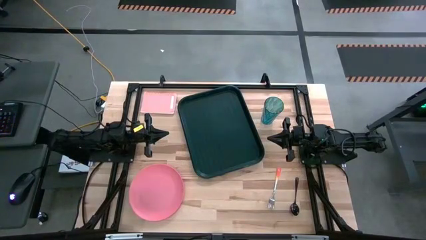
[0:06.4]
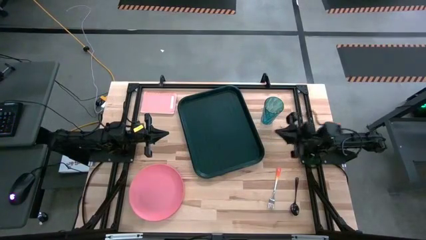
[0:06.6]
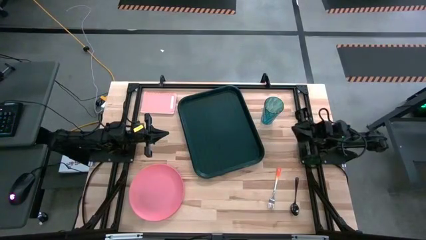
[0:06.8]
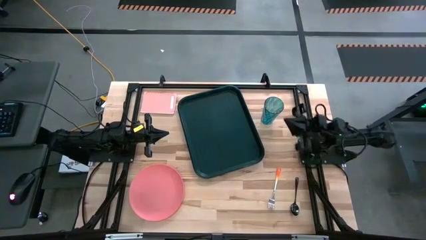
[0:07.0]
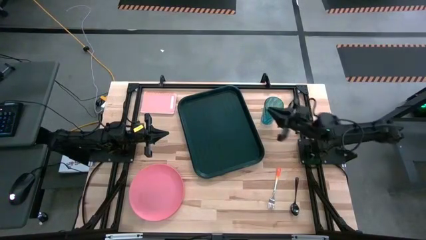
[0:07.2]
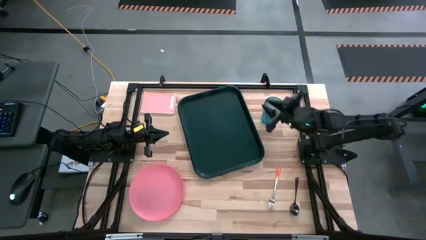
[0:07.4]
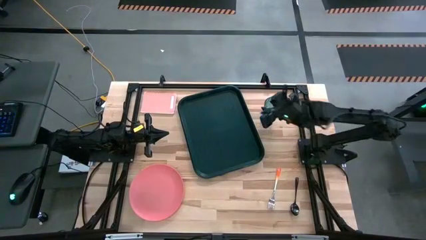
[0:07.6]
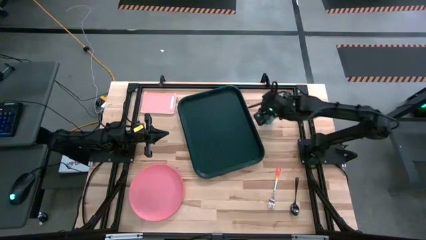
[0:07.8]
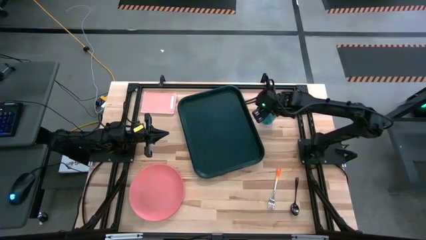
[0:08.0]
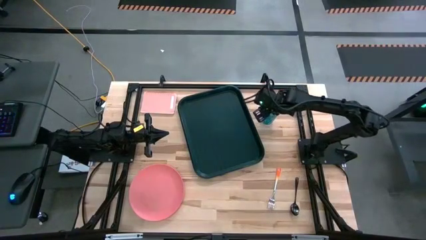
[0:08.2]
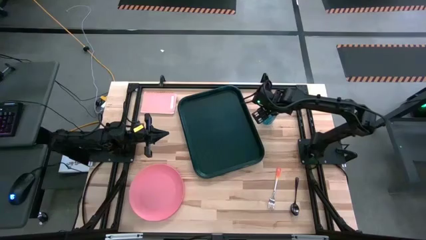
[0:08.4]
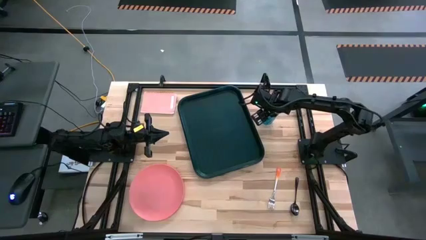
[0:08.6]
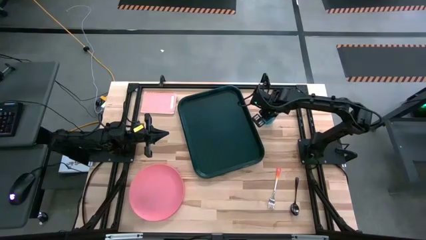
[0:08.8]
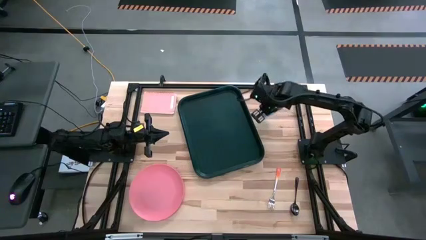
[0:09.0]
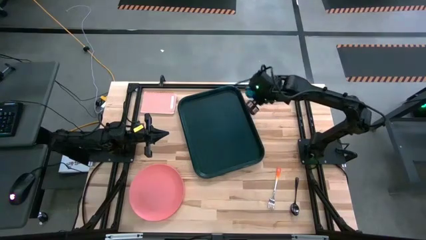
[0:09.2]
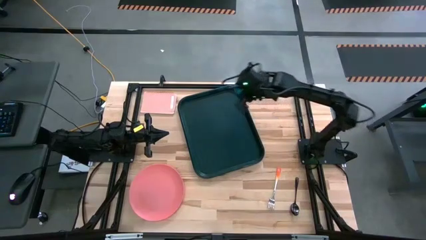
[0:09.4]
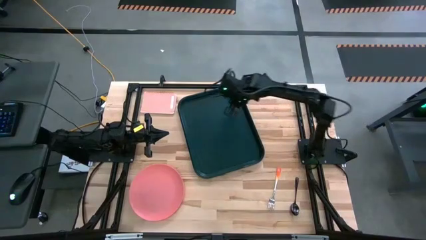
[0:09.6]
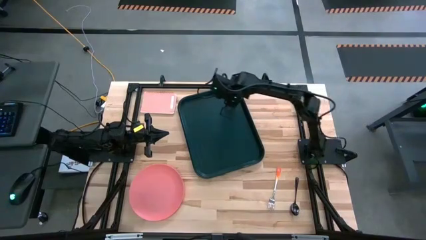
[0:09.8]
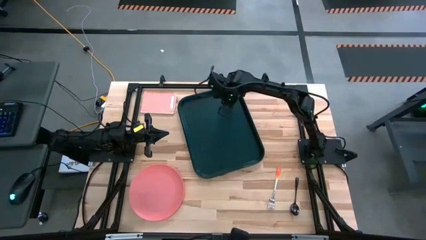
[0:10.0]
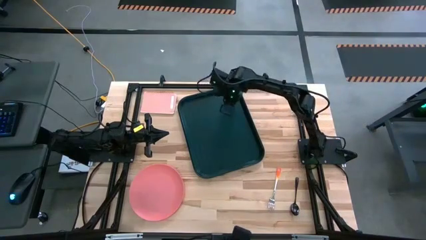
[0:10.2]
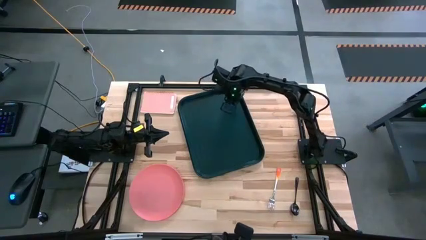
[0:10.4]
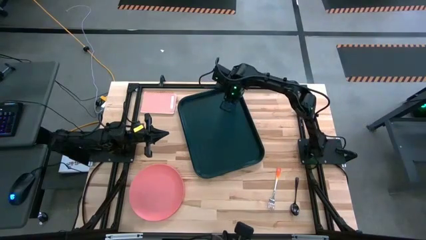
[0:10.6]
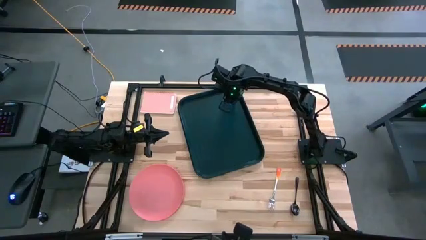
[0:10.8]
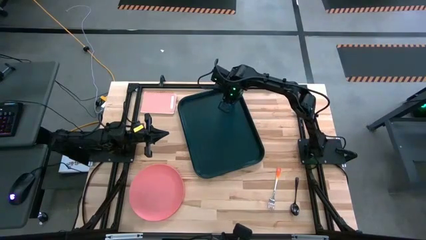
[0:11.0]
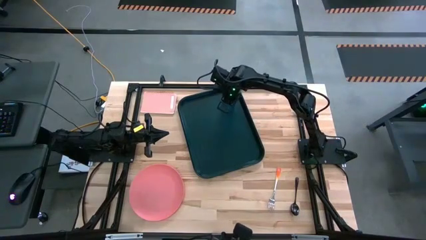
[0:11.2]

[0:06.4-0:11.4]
Task: Pick and place plate/cup/fork/spoon on tray
Put the blue cup on the black tray

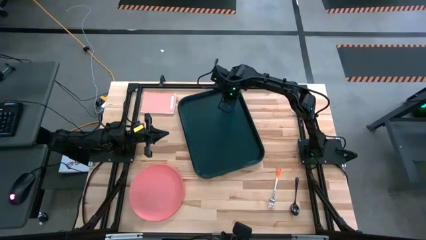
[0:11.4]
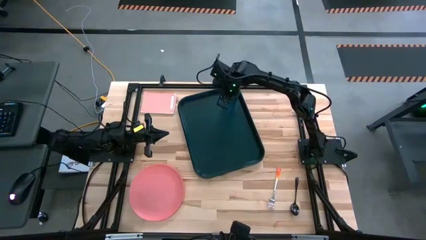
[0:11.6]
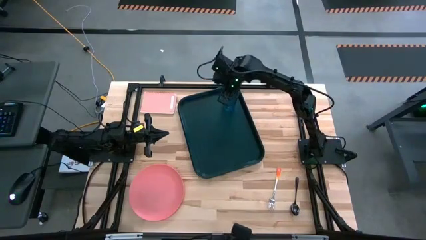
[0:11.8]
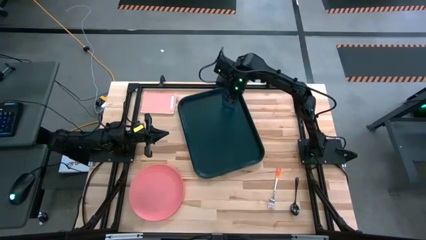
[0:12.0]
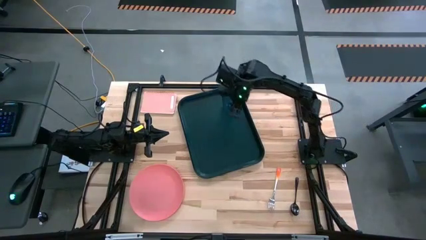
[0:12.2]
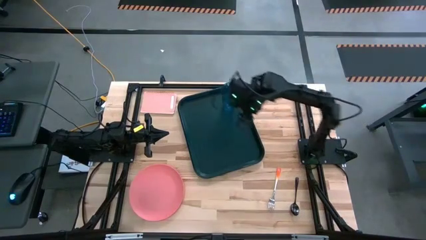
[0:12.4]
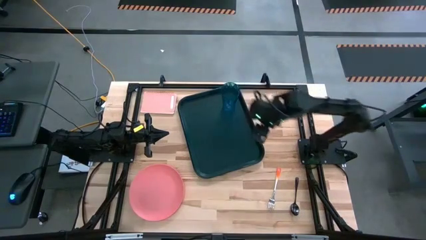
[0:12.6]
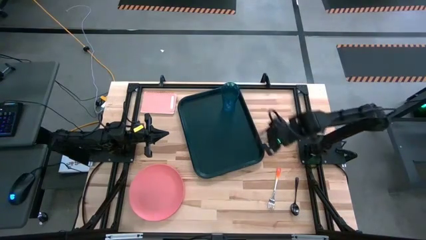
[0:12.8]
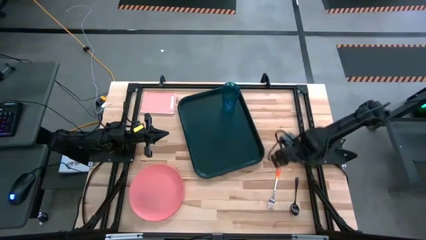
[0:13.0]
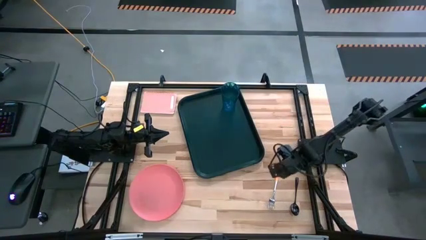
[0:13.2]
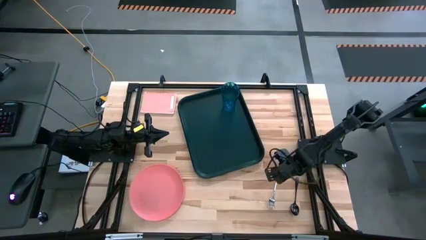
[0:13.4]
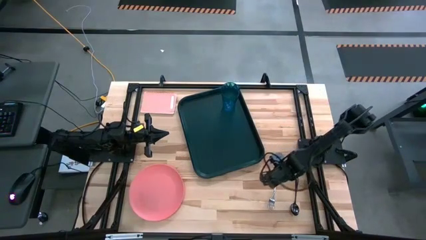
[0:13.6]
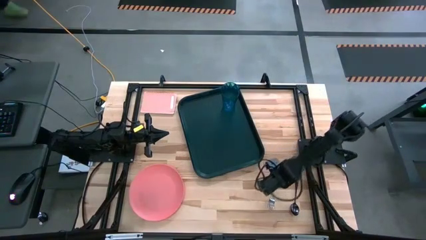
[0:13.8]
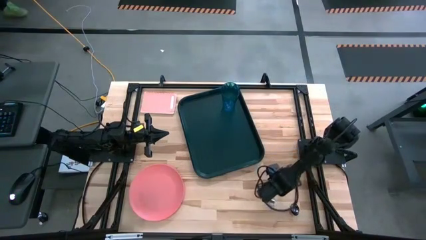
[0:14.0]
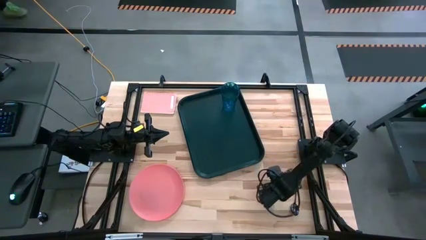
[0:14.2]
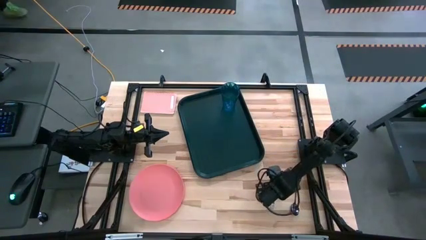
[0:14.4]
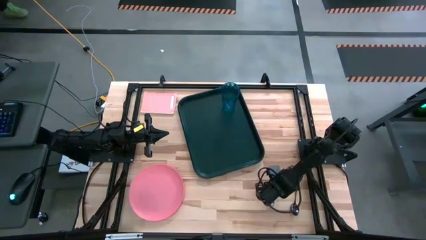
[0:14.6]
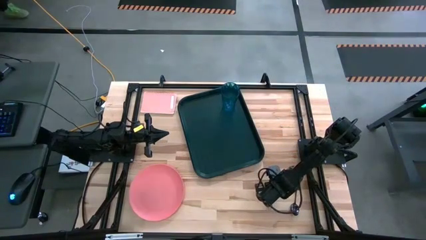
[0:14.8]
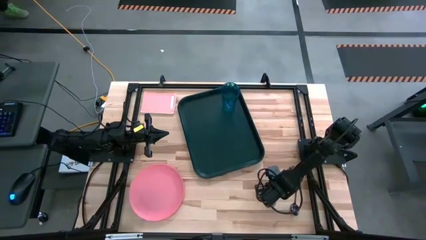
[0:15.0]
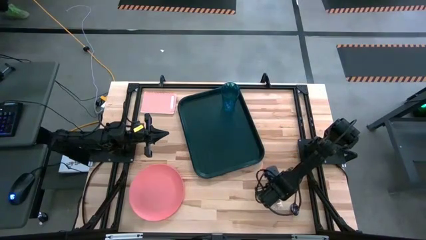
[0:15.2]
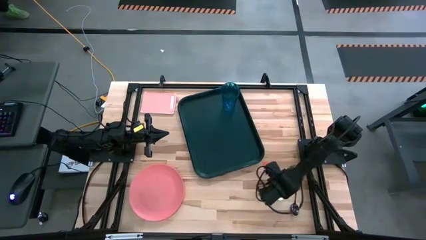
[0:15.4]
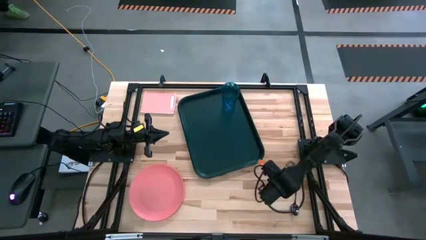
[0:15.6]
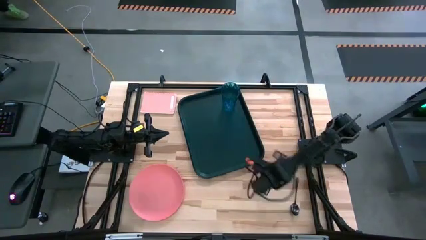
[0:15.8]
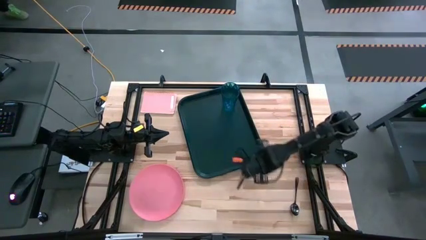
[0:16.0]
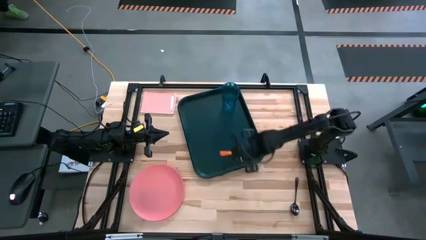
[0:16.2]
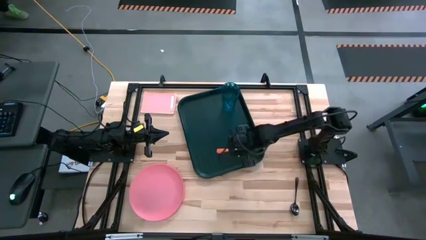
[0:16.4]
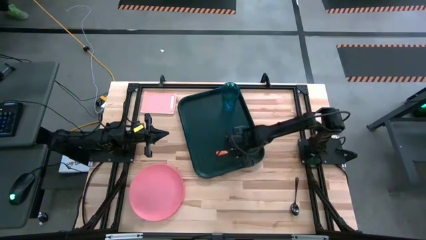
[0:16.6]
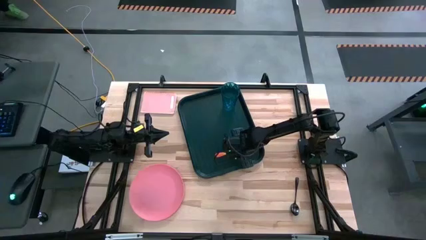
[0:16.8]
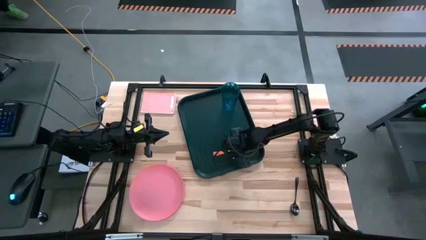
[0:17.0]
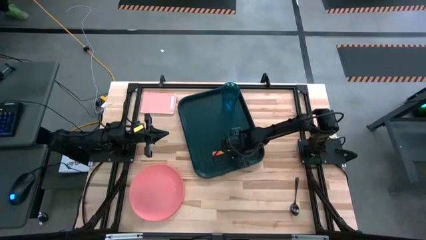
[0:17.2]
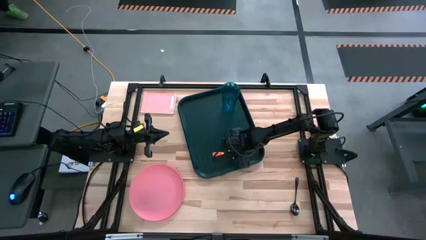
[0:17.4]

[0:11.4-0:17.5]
Put the orange fork on the black tray

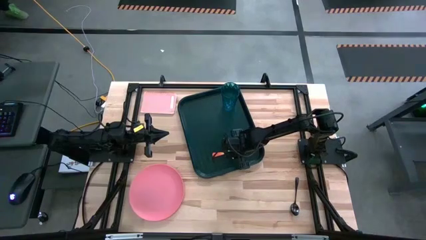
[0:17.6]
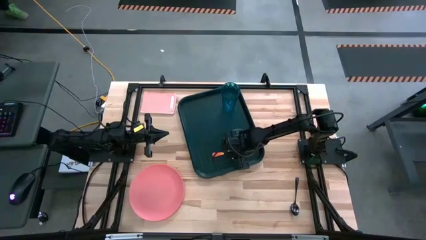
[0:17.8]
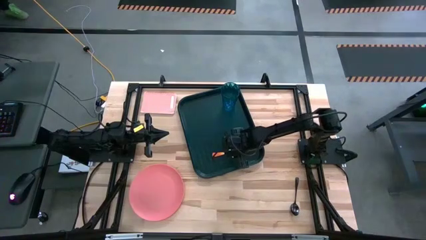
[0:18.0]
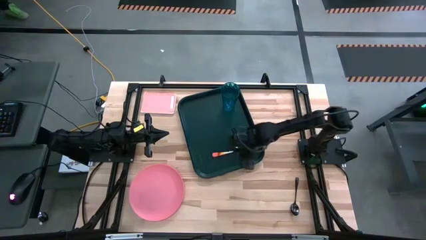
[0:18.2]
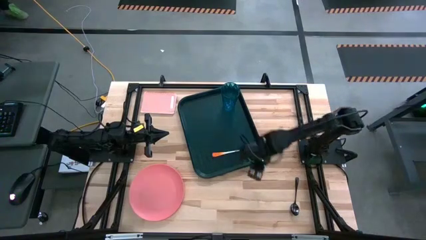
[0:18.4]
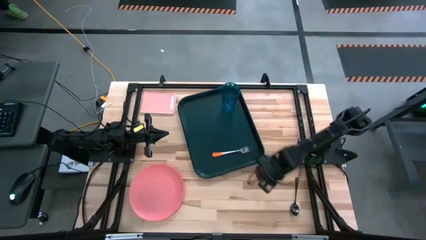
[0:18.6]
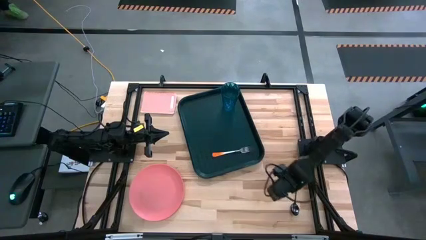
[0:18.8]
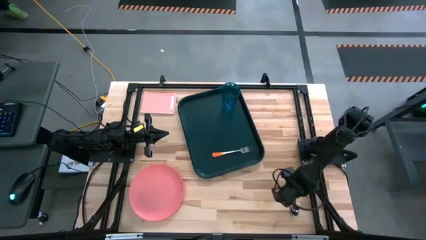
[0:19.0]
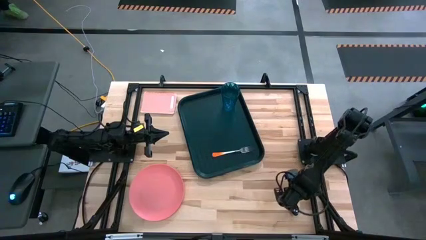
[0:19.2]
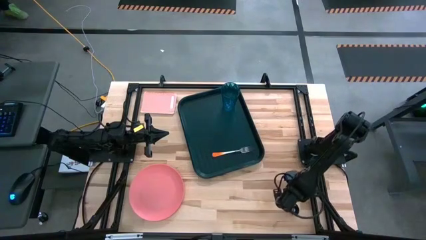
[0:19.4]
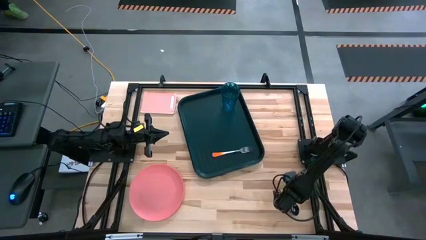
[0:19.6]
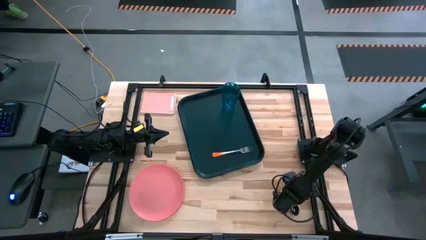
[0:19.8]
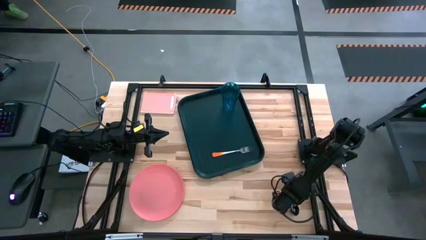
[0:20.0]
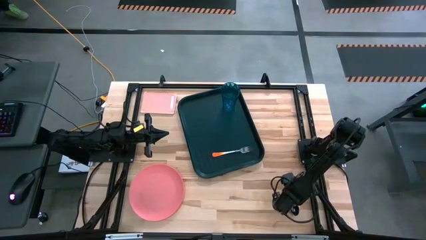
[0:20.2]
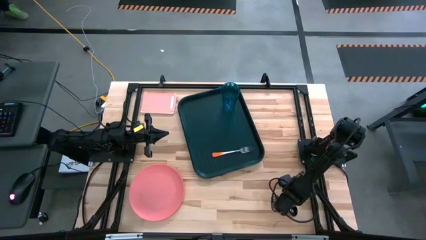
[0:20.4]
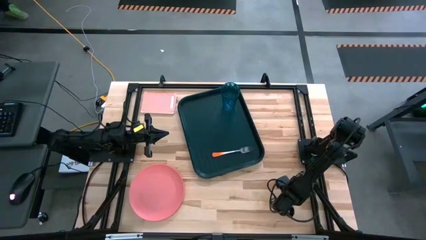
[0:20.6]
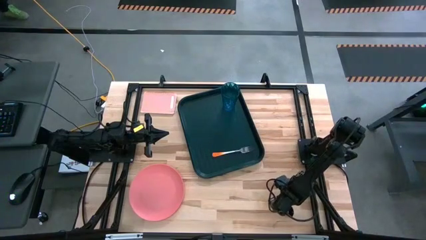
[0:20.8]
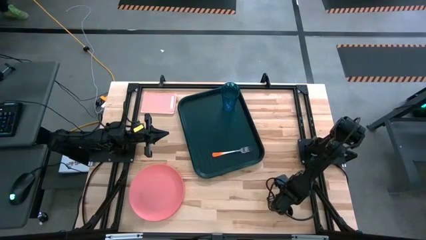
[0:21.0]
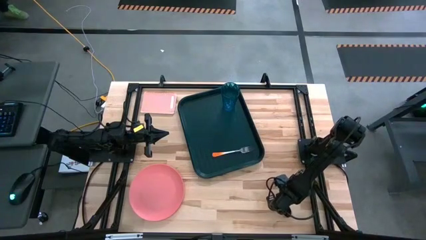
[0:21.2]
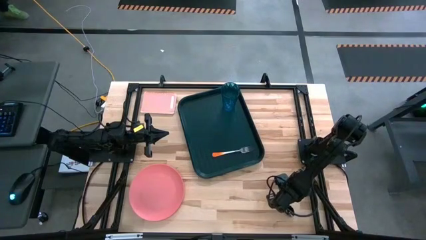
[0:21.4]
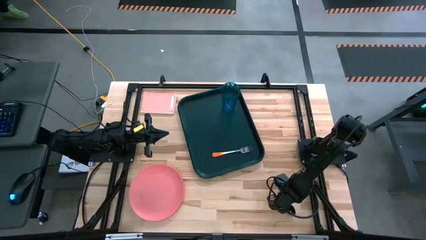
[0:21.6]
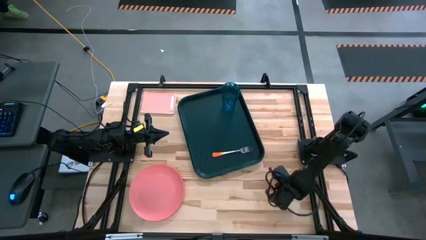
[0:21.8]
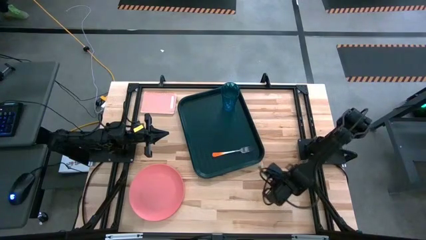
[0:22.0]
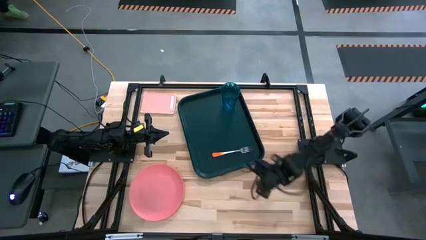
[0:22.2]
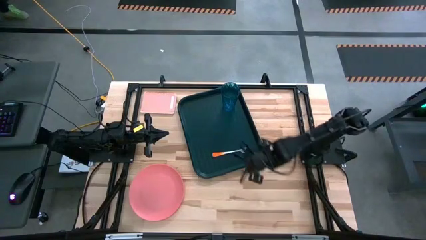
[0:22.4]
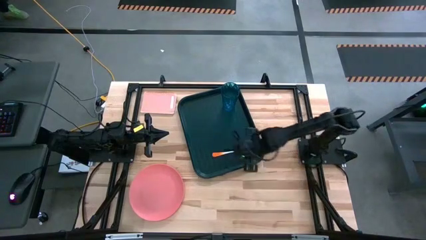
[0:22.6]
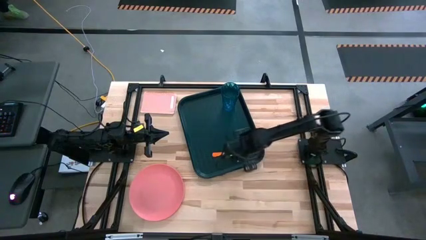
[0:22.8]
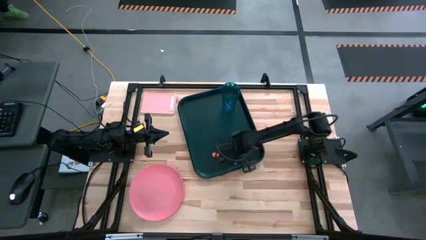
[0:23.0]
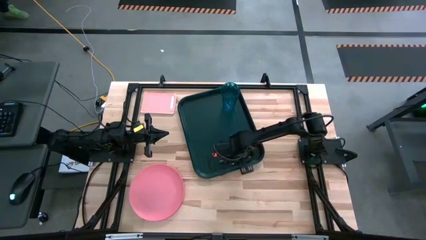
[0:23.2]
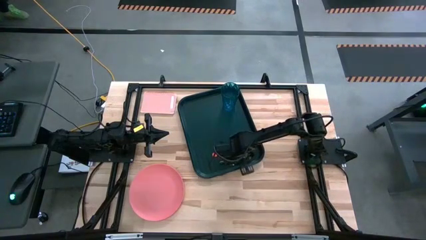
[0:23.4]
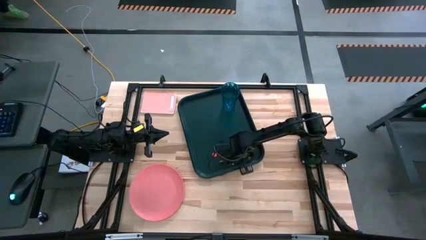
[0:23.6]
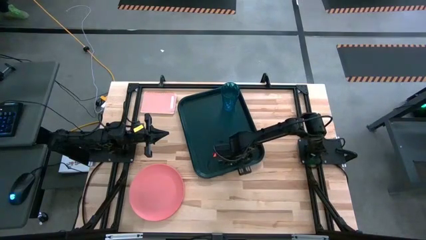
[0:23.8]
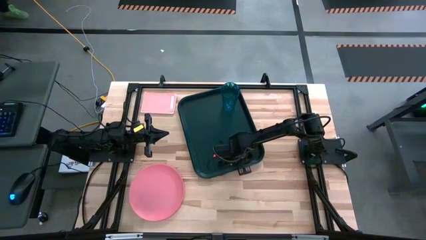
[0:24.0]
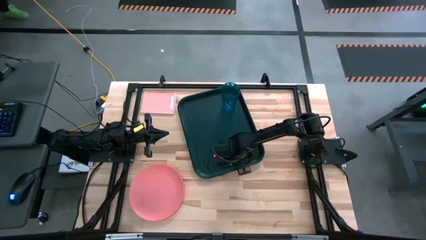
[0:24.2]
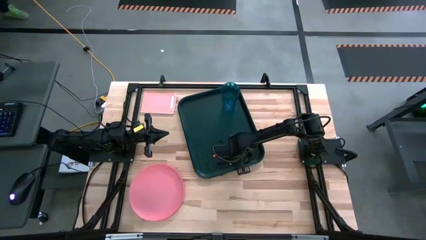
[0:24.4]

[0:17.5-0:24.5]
Put the black spoon on the black tray to the right of the orange fork
